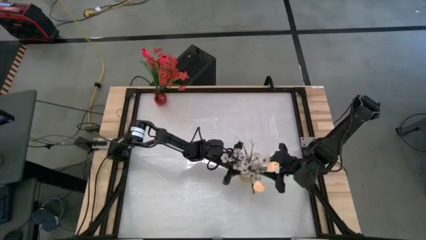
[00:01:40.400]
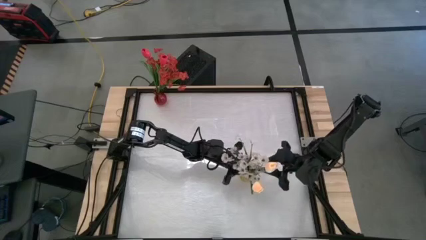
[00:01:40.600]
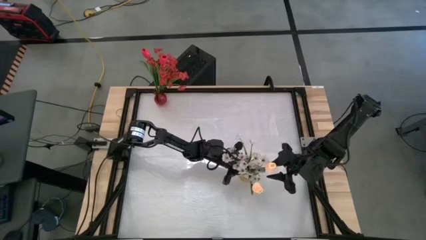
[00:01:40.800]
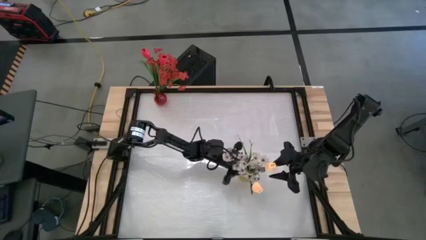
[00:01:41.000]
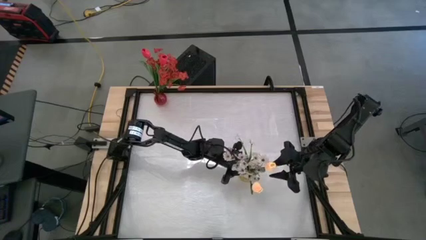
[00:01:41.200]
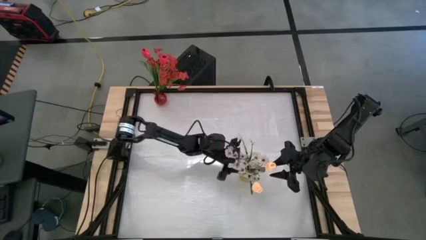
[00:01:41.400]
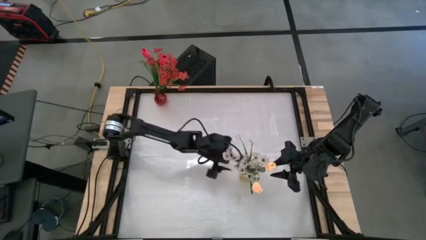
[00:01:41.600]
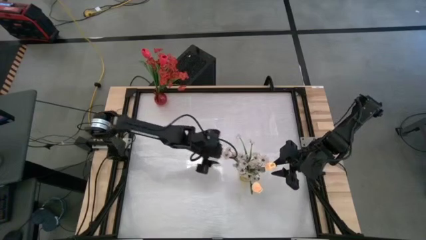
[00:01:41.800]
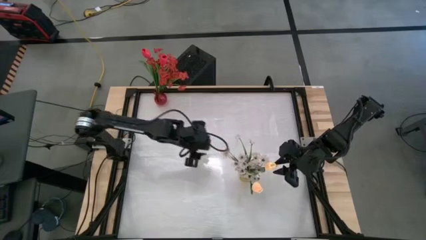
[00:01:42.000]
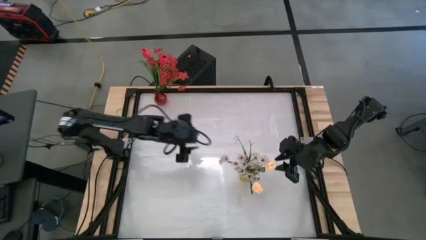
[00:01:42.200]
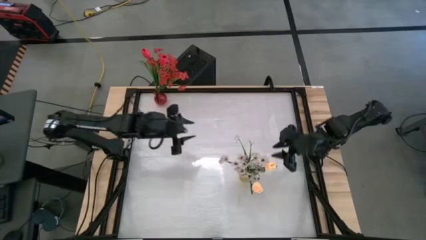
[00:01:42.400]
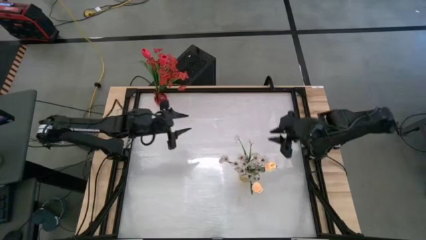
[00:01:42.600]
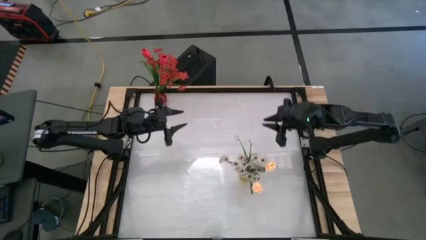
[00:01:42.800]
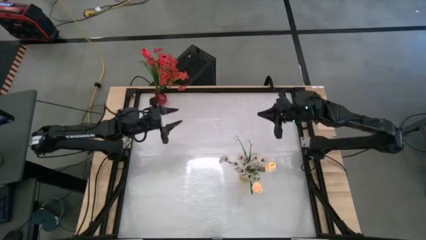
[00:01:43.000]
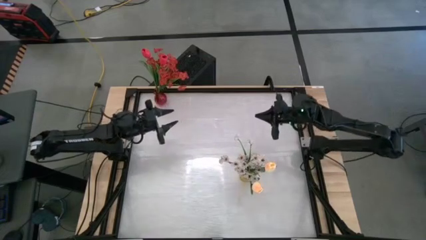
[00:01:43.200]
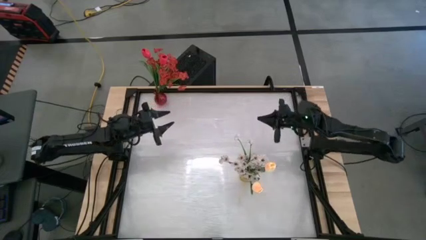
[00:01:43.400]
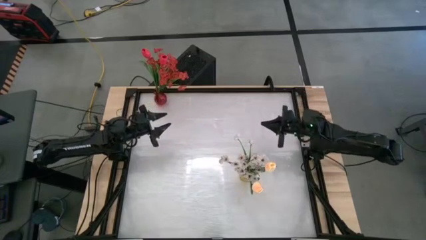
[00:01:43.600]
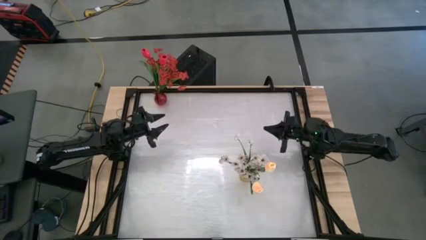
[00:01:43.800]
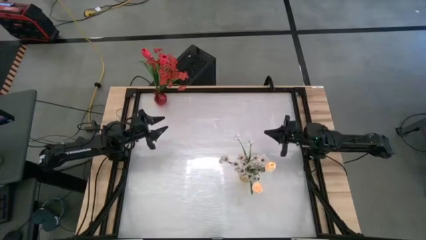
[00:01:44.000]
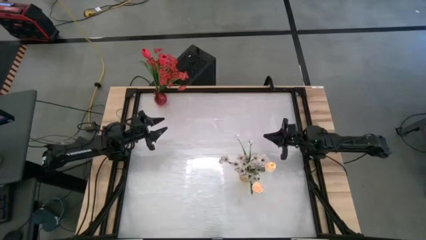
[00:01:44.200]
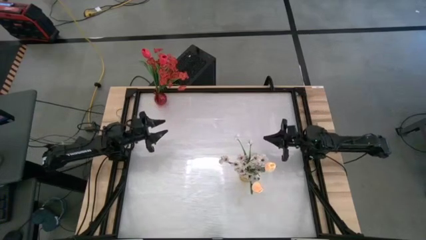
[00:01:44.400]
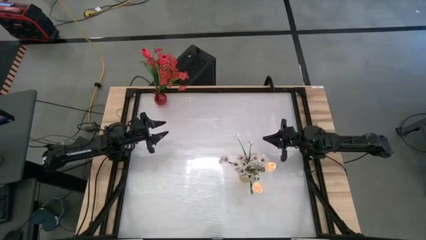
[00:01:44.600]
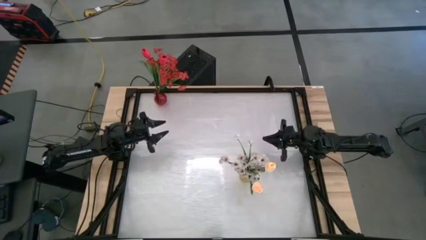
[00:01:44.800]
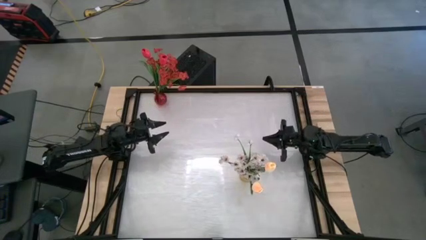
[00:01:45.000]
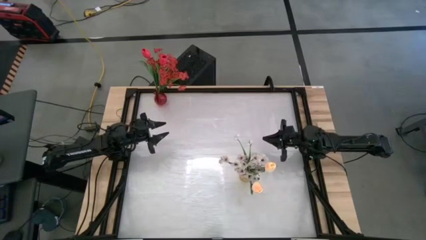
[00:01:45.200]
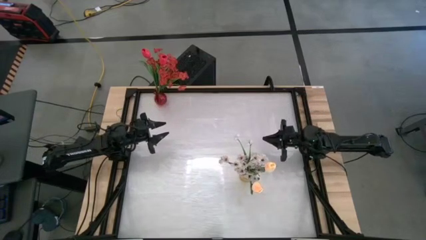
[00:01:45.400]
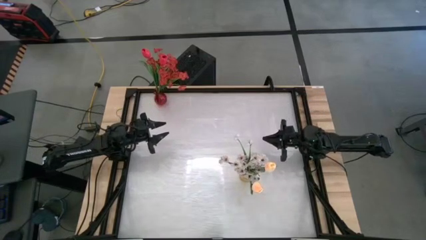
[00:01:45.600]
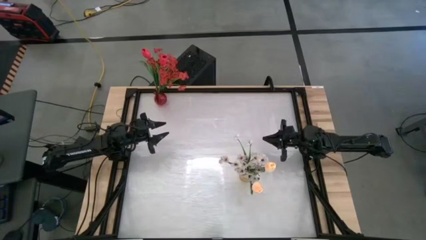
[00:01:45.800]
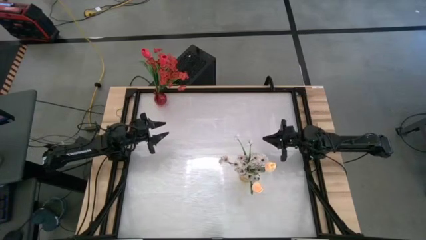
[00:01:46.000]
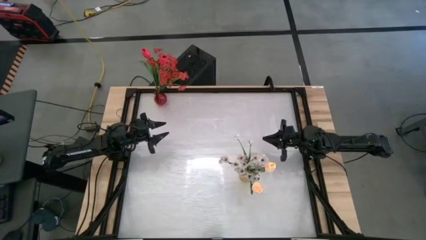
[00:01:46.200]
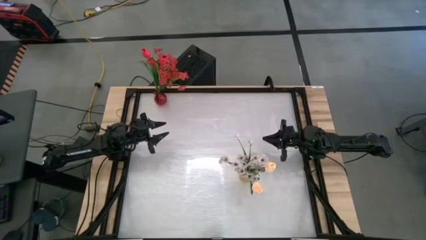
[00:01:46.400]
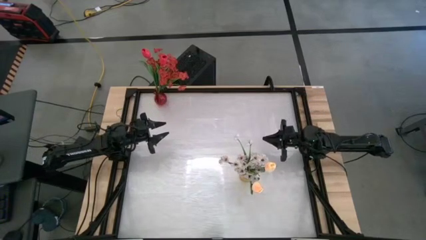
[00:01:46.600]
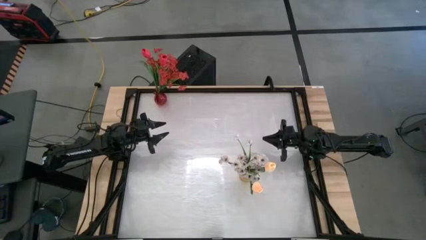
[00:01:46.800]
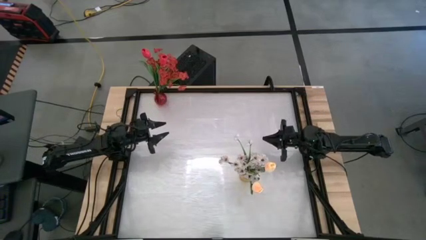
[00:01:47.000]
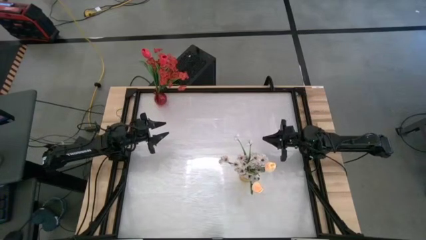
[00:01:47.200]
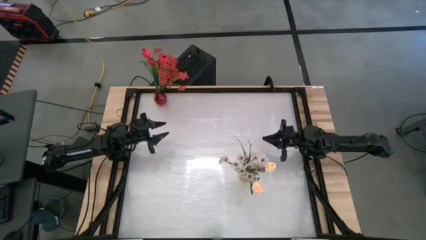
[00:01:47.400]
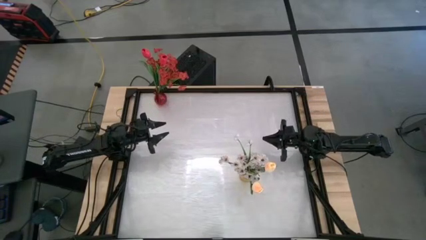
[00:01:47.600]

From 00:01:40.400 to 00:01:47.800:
Task: Sort flowers into vase by color
Return to Home Position

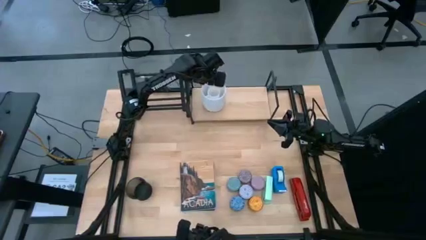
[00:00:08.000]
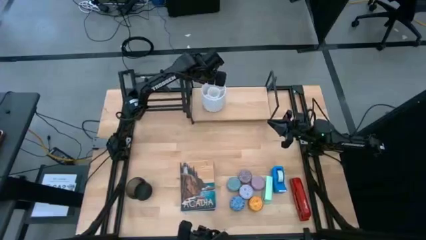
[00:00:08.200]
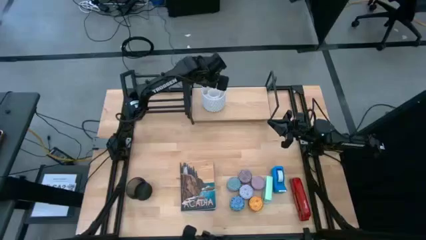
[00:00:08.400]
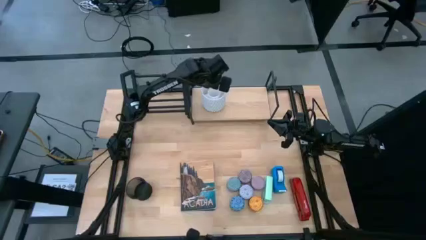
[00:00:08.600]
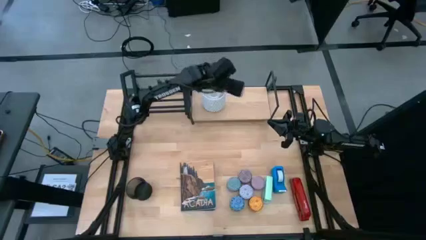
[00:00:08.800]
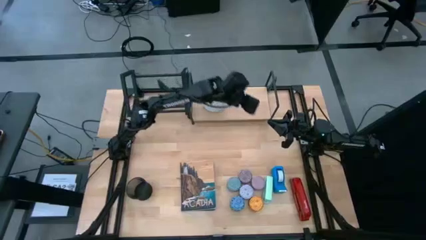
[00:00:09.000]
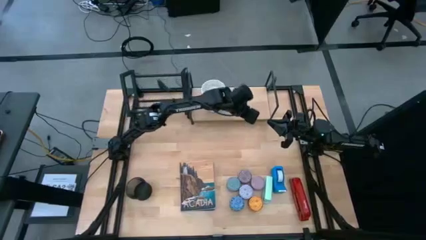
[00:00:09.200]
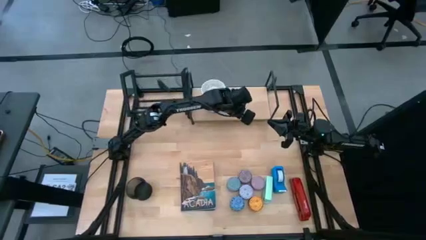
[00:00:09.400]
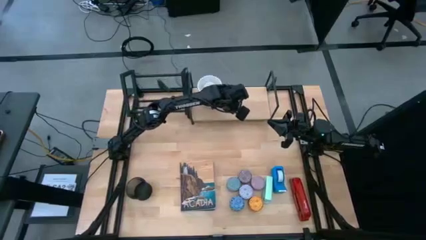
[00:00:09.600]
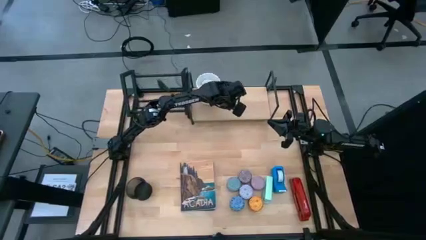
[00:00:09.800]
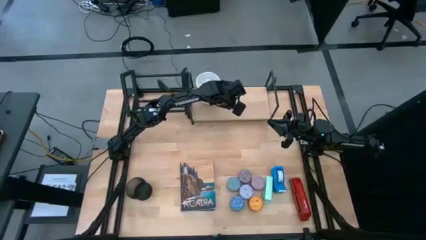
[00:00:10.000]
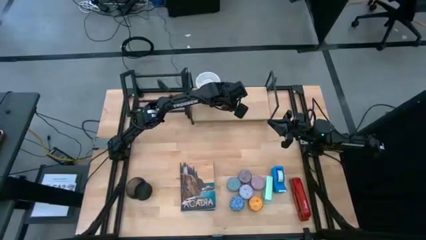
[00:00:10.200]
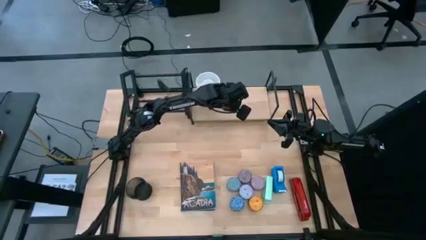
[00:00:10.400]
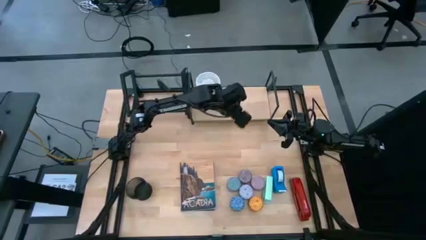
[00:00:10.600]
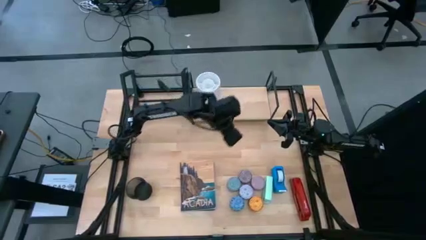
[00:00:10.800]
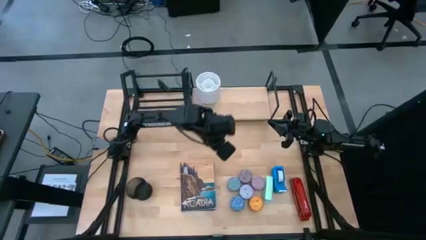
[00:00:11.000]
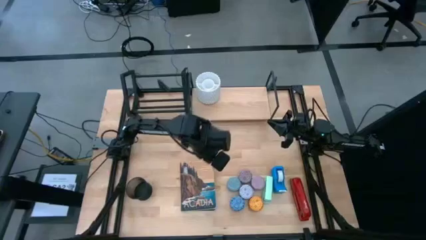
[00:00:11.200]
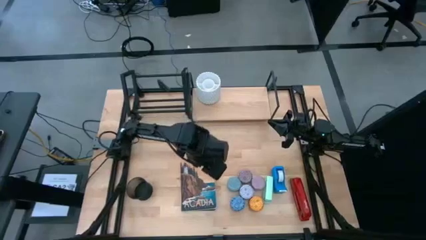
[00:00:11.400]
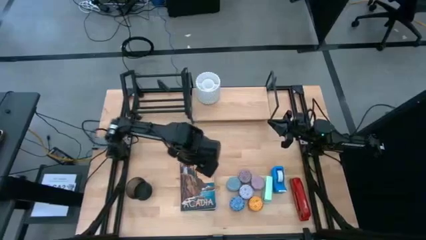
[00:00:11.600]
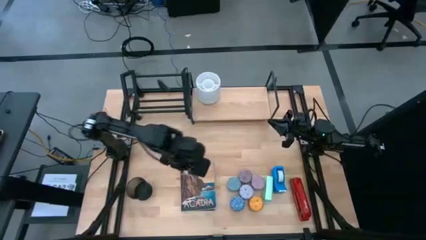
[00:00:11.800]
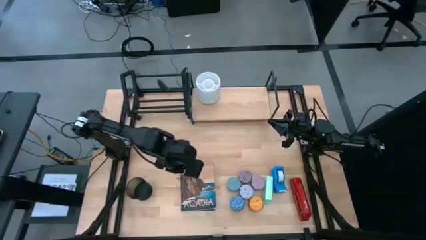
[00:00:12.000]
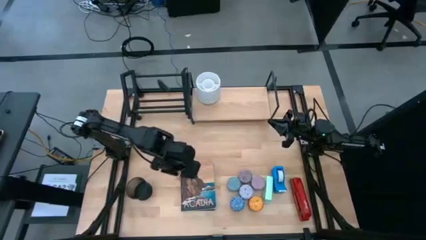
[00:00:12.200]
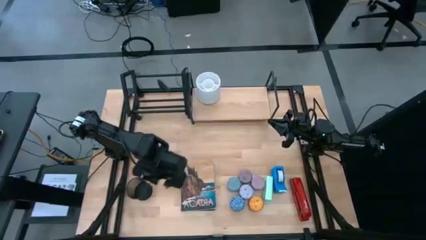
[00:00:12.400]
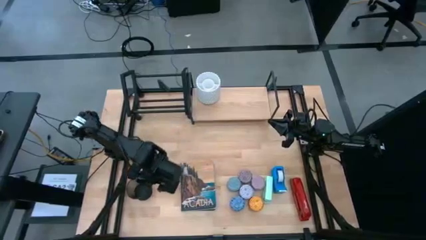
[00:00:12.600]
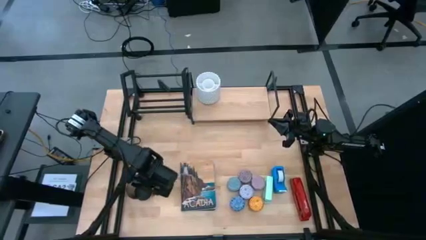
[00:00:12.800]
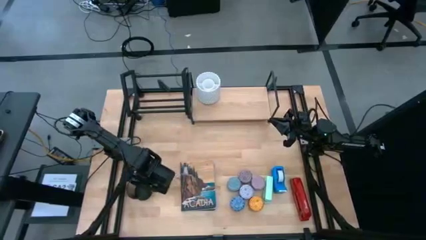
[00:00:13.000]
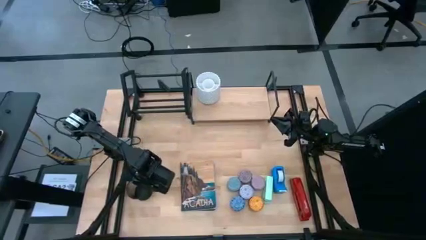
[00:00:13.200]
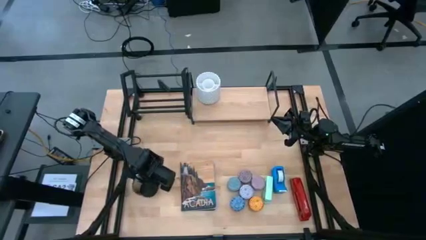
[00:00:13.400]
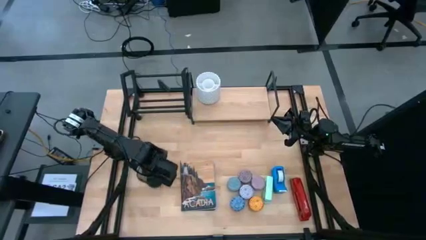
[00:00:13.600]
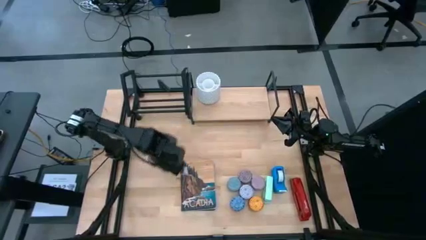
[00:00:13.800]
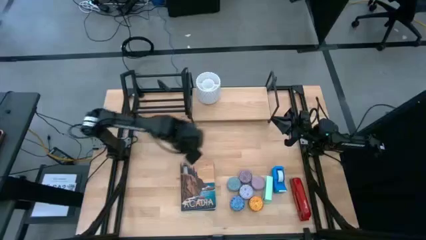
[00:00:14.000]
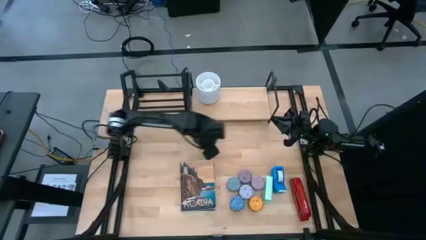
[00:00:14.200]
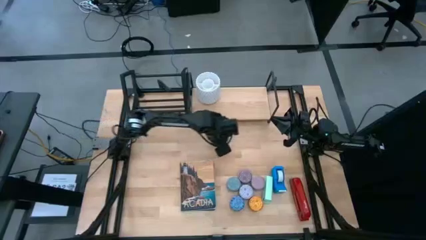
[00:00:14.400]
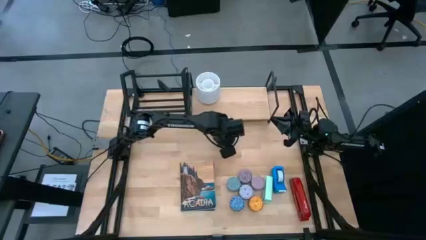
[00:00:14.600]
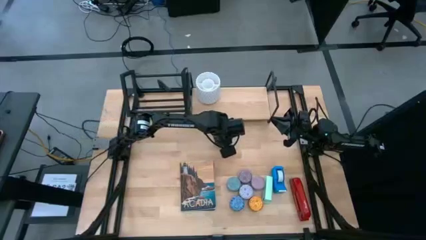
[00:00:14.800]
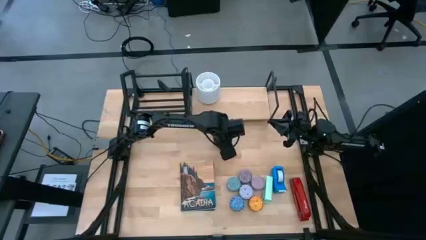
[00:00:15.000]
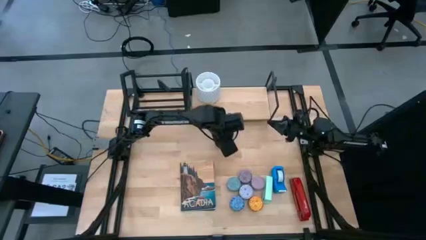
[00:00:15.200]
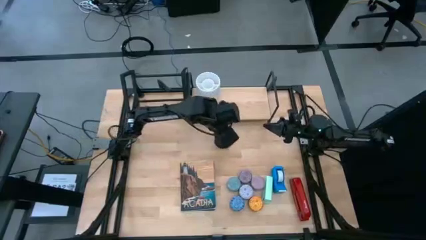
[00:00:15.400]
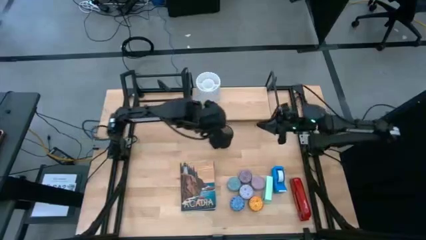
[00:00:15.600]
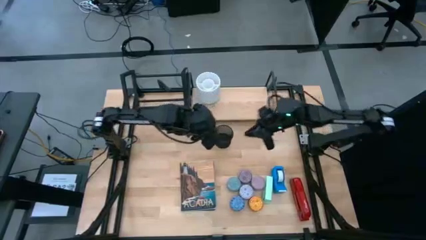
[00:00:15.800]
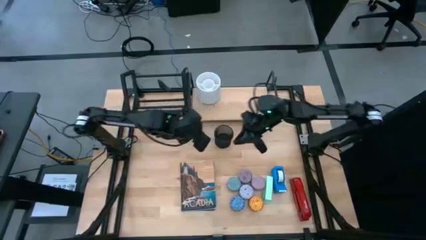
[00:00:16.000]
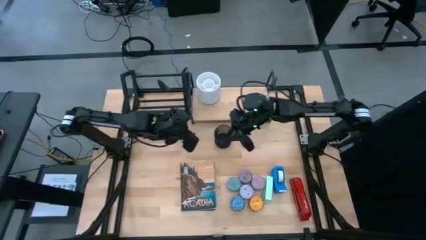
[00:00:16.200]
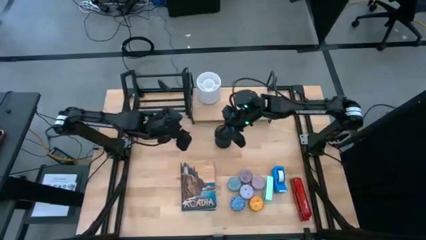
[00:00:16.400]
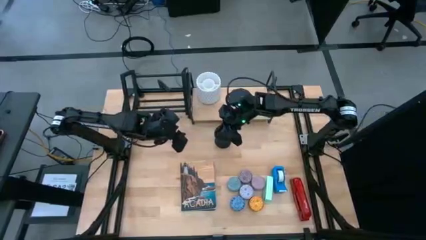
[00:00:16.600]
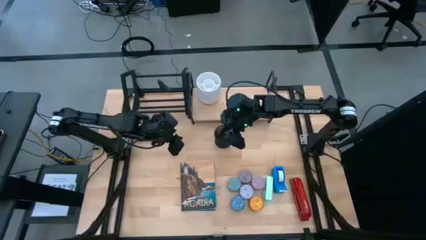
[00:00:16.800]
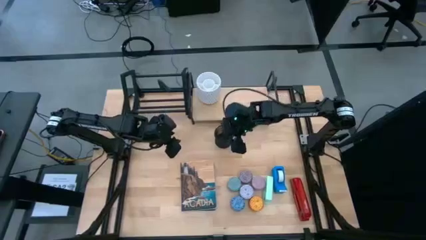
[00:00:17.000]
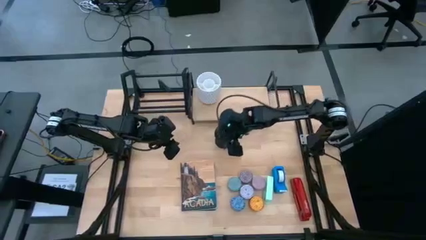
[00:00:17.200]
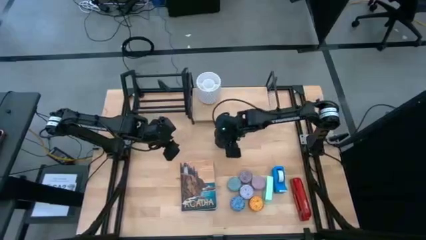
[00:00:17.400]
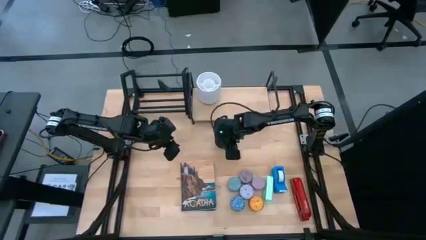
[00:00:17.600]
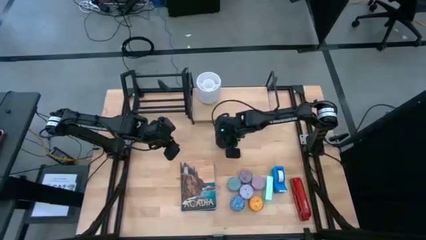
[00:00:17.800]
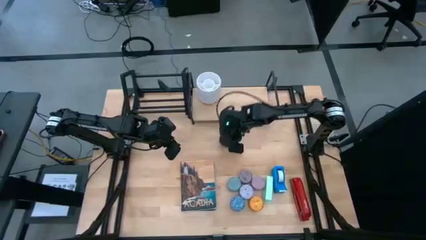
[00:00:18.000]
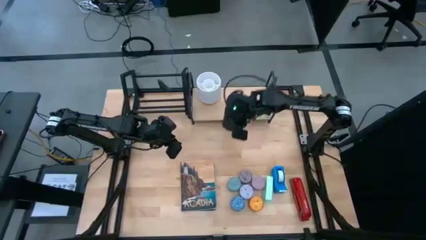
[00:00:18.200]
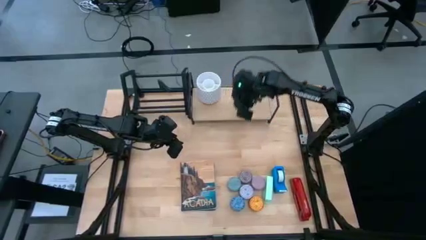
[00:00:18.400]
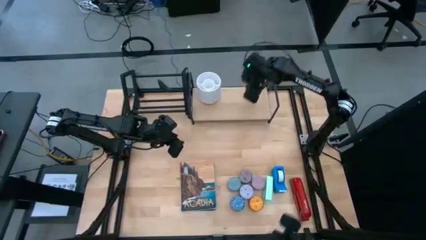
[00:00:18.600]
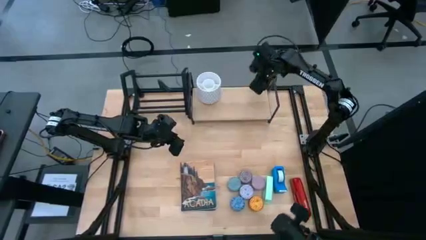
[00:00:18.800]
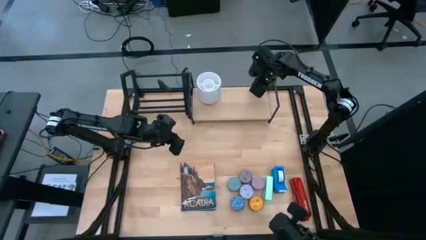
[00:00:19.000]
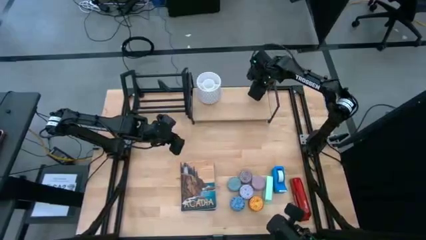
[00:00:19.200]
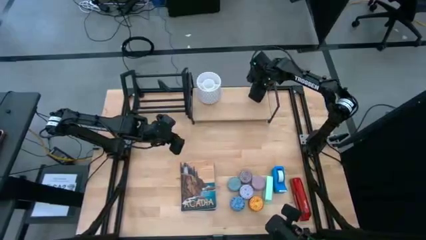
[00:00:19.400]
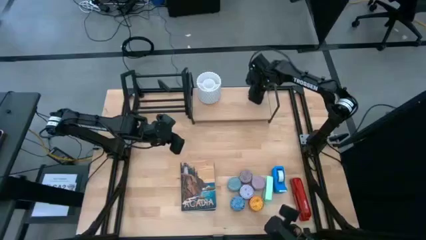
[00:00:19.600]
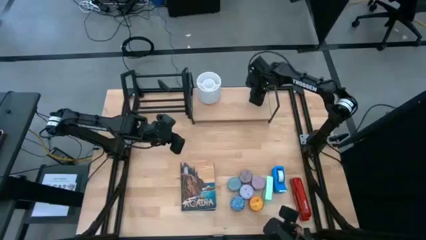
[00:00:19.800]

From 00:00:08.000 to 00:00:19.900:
Task: Stock shelves
Put the black pen holder on the shelf
